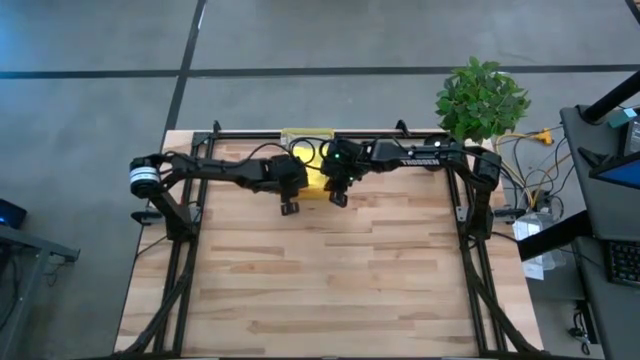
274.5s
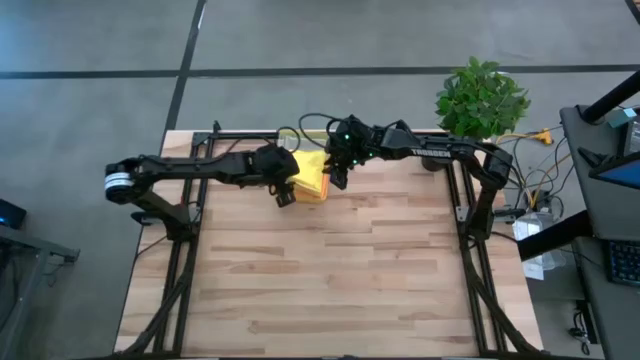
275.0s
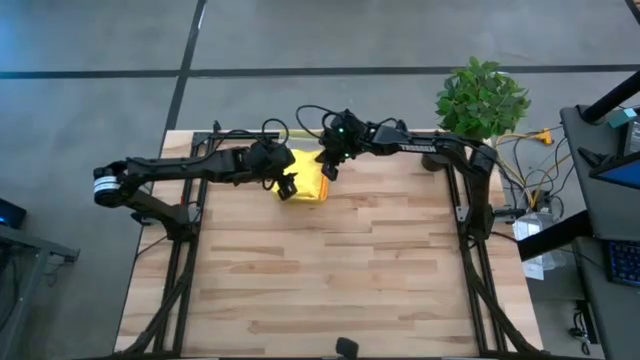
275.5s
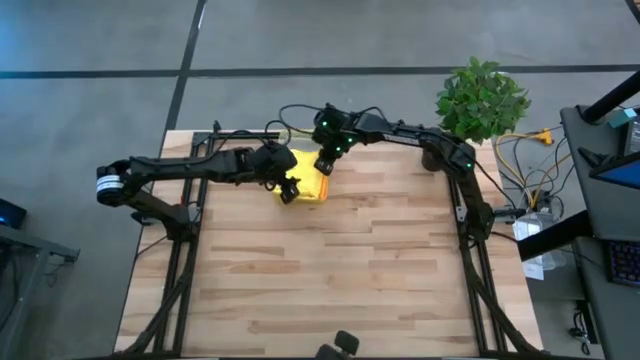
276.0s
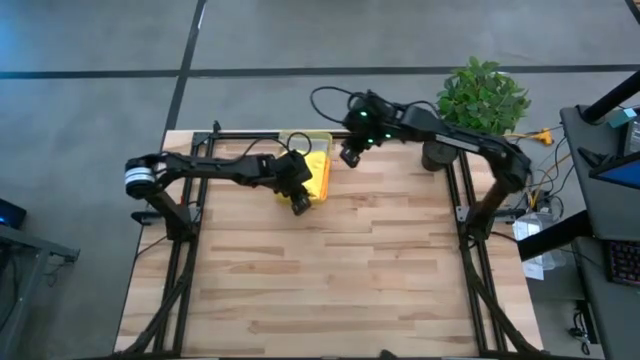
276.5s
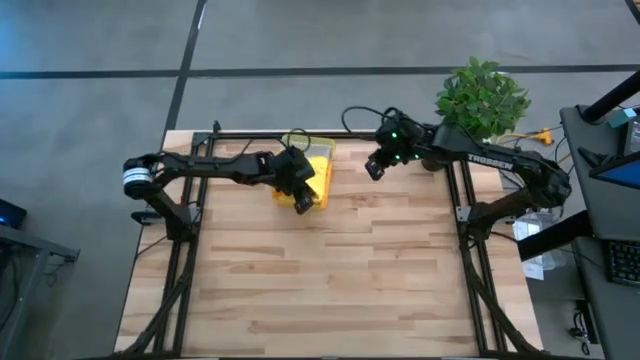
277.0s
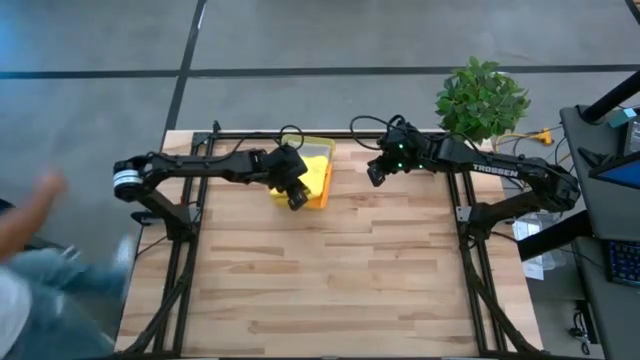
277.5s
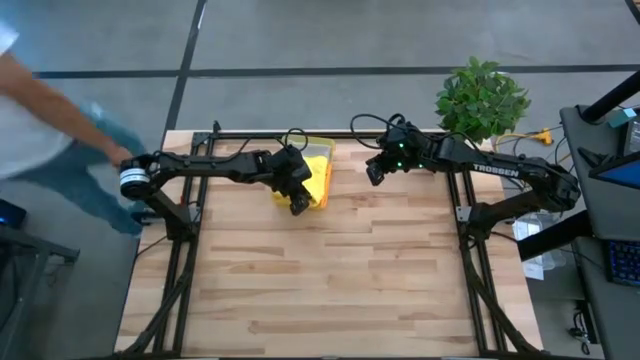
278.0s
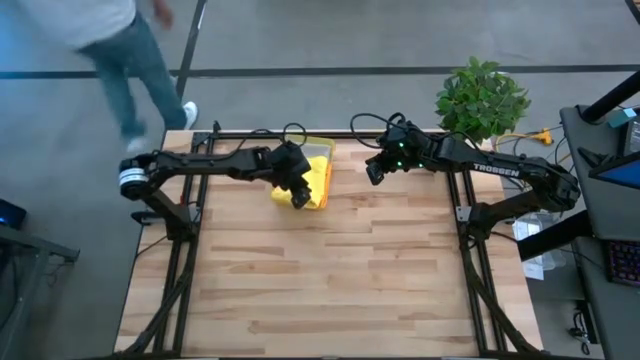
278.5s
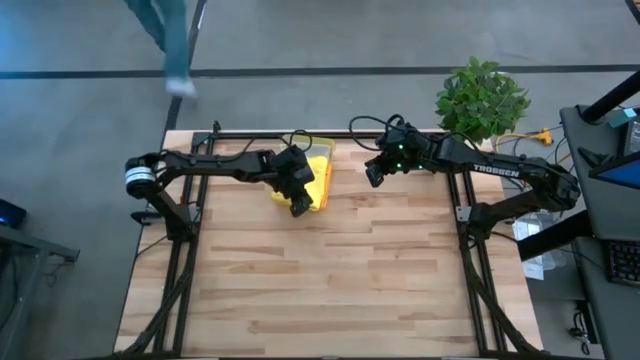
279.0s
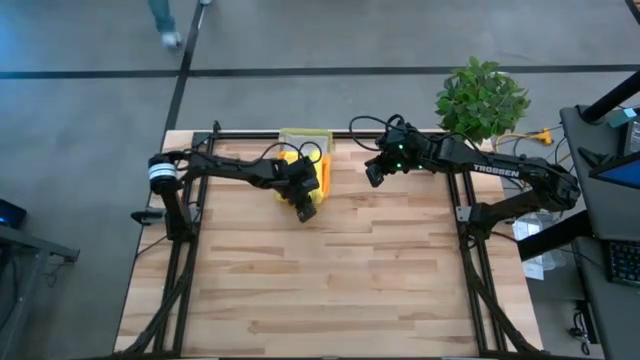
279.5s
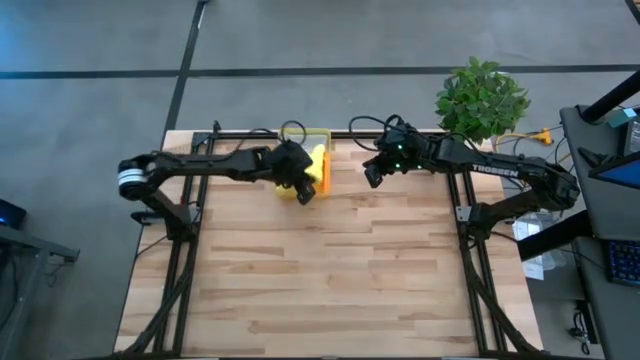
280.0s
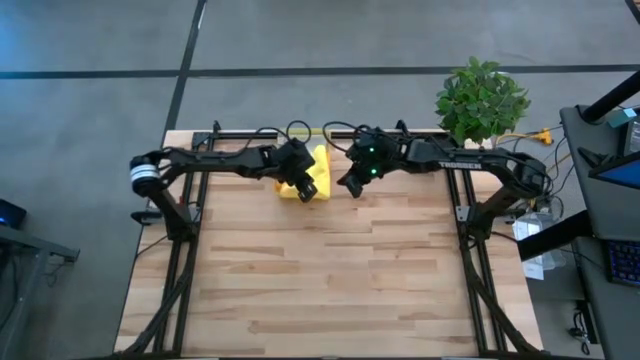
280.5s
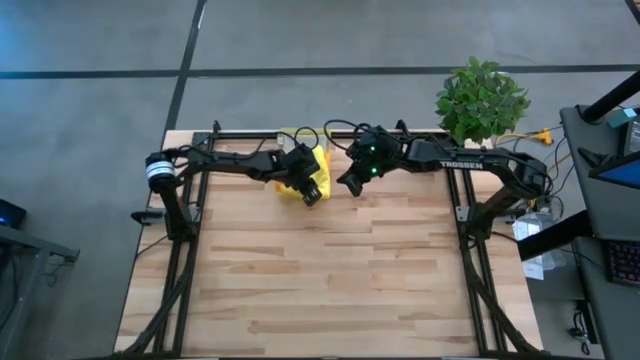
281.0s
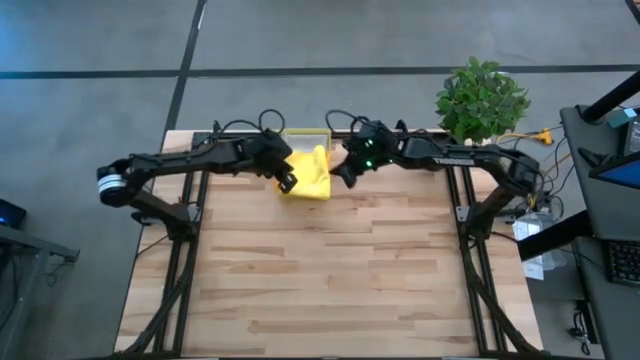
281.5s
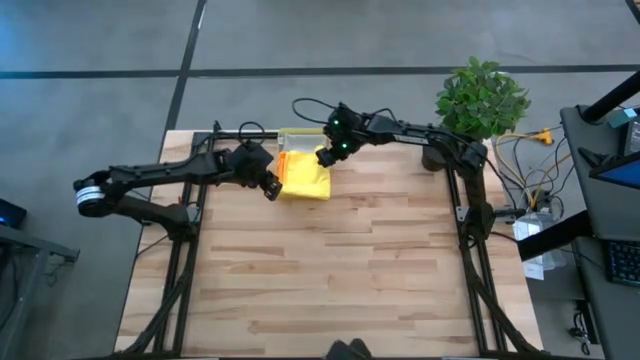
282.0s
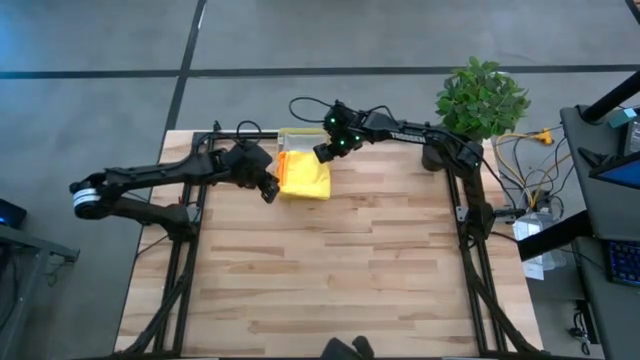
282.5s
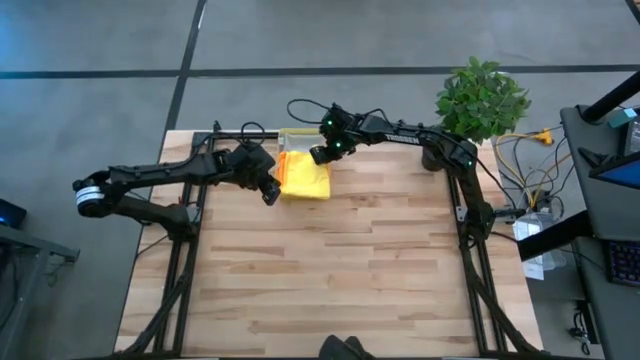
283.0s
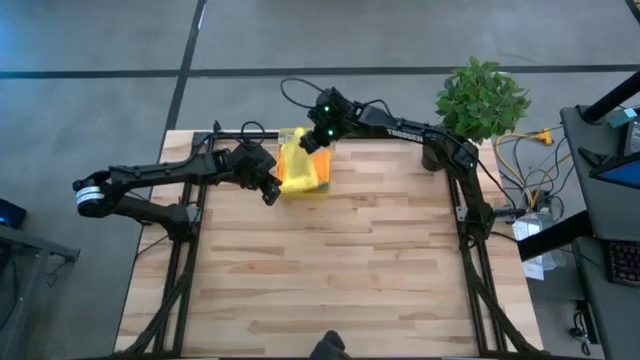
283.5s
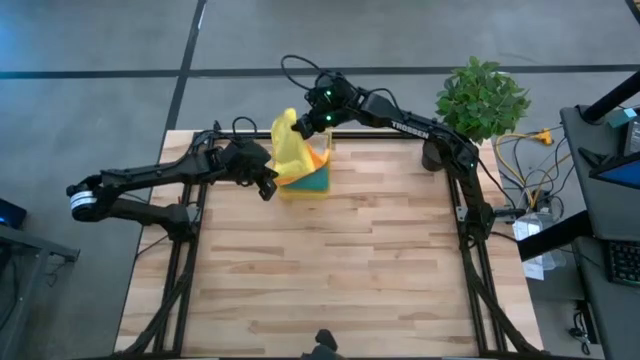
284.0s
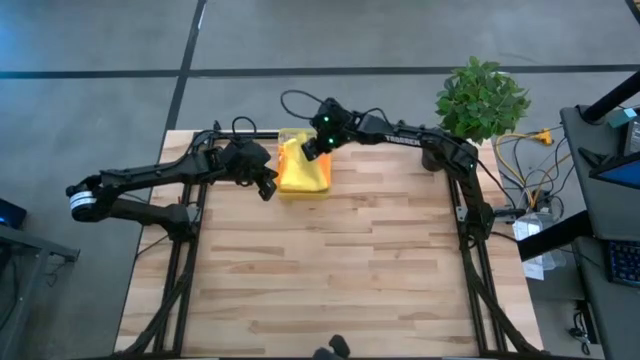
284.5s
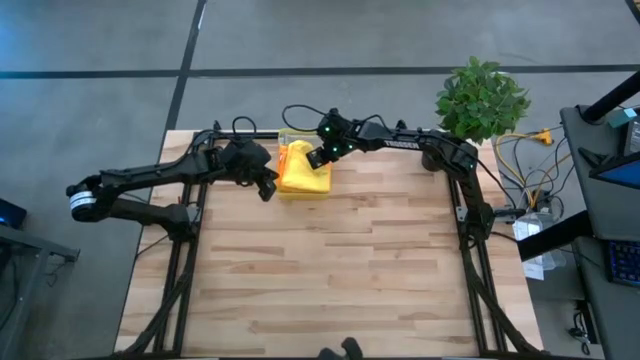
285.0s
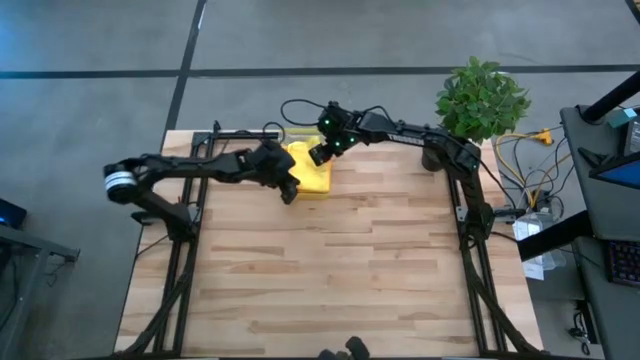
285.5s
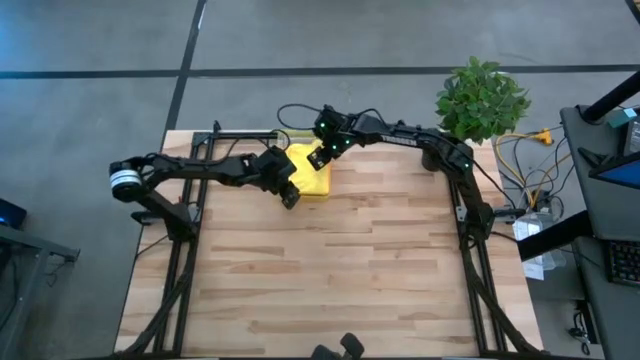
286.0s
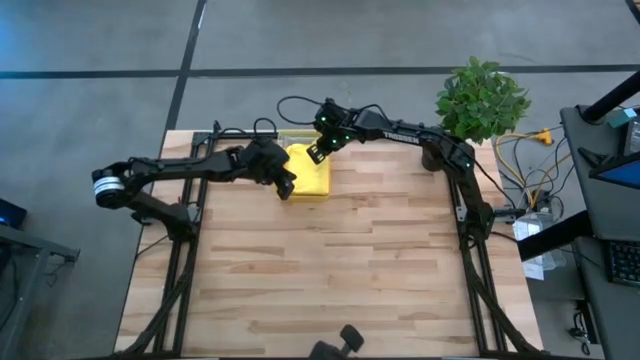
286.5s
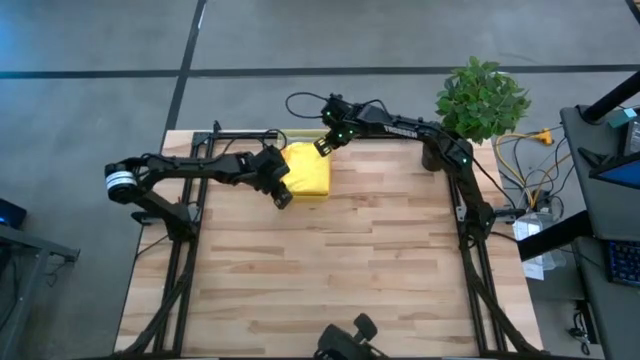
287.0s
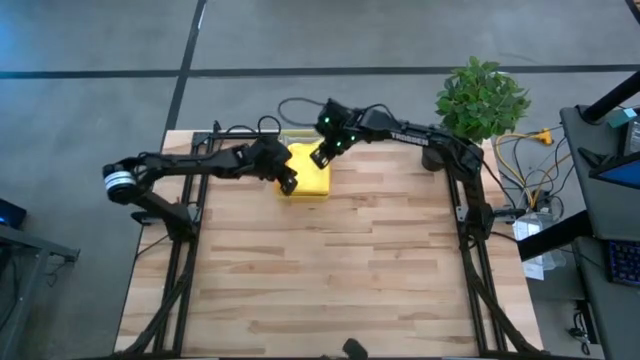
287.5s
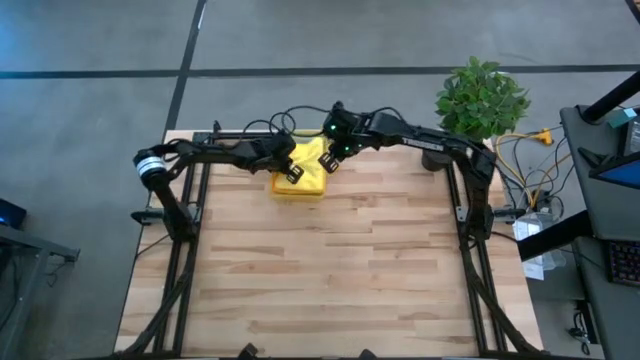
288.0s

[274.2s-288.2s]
Task: Fold microfiber towels
Stack the folded yellow microfiber cloth on top of the gray microfiber cloth

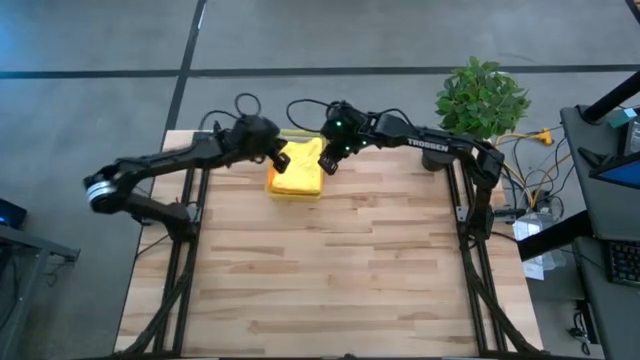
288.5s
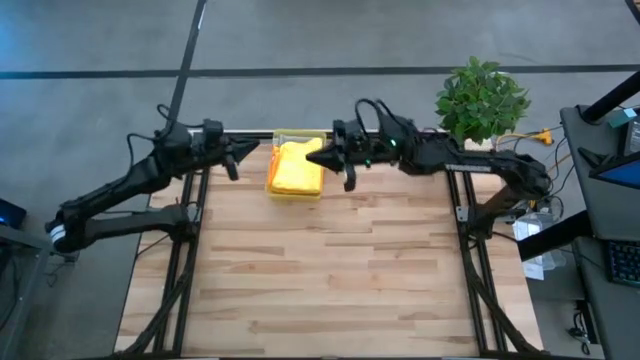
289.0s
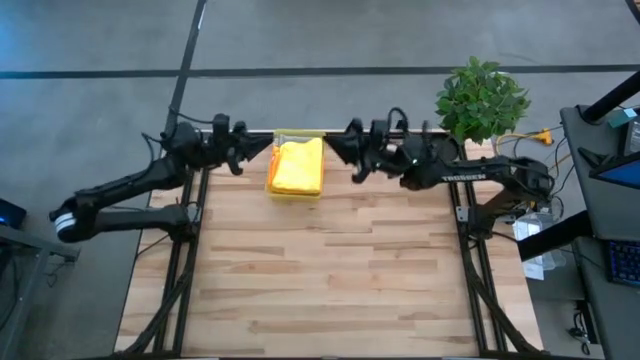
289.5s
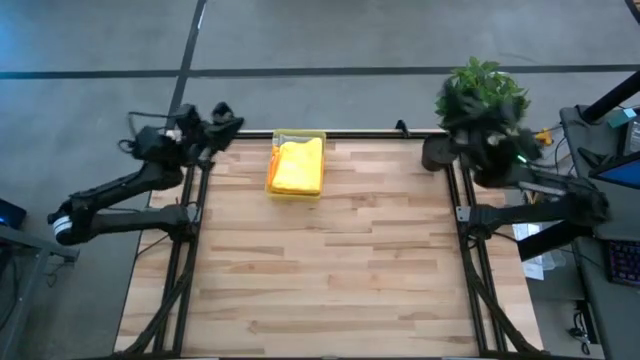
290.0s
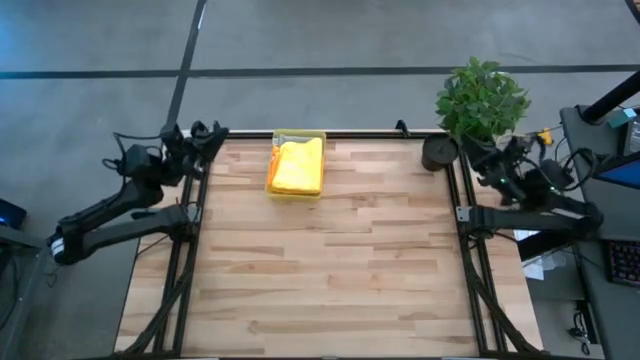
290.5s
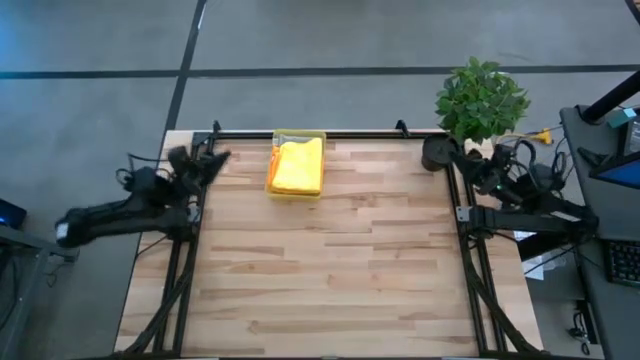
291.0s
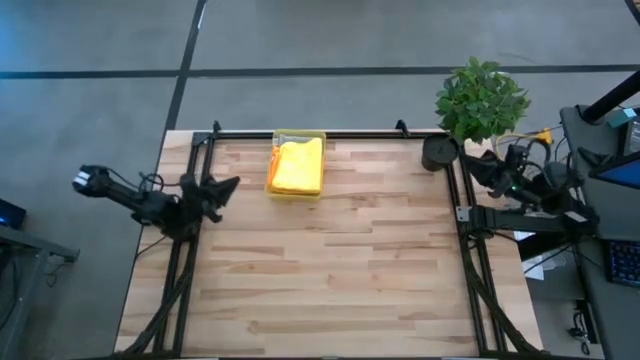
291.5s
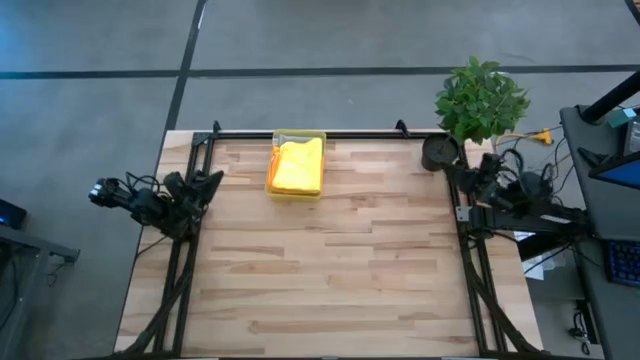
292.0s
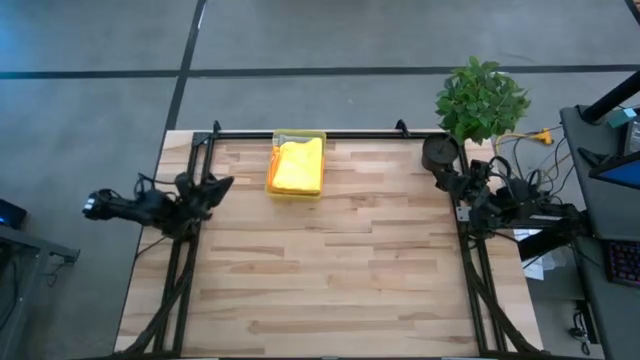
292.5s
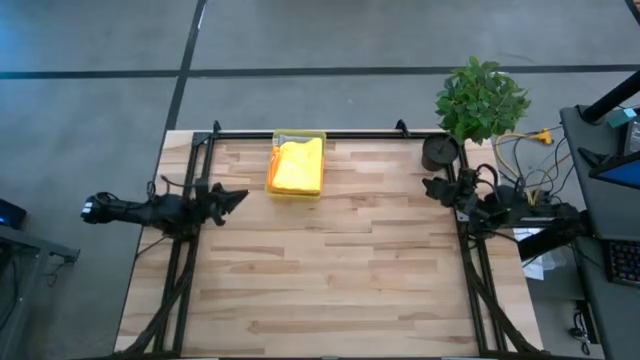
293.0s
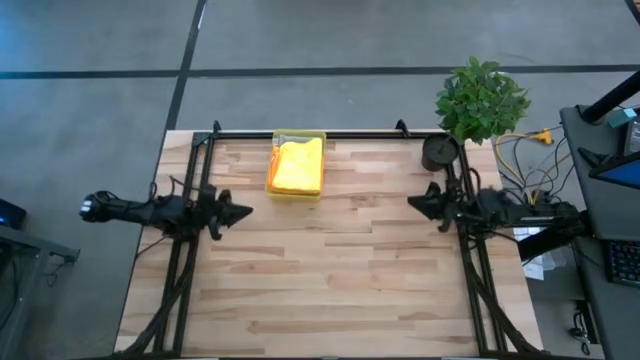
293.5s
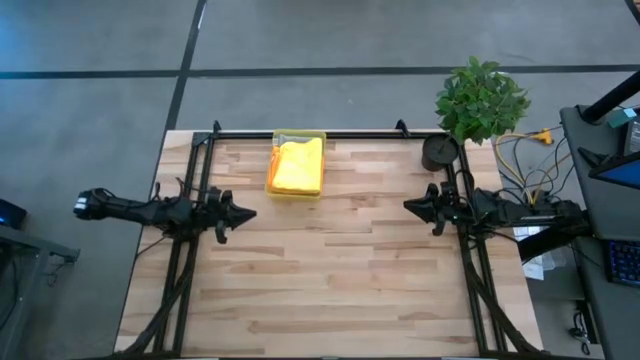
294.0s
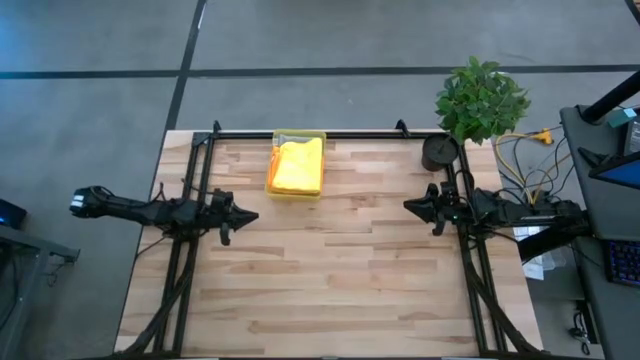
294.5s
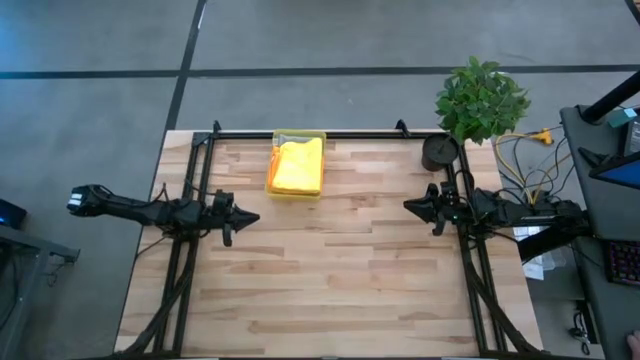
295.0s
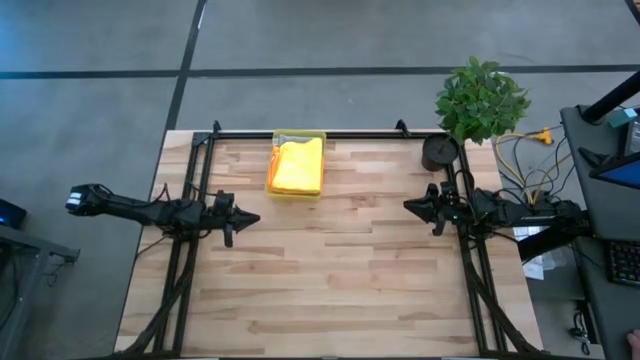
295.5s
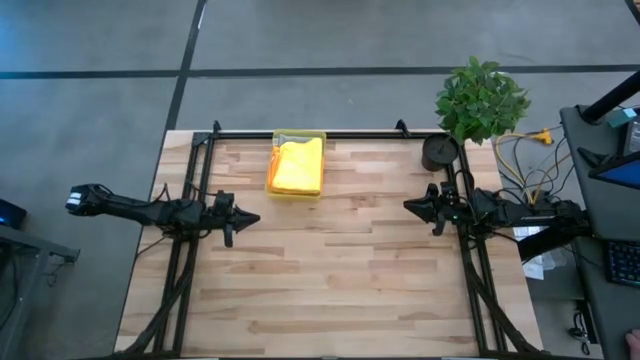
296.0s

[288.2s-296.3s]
Return to Home Position
